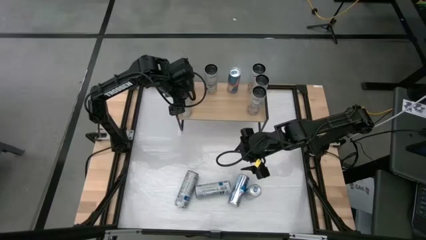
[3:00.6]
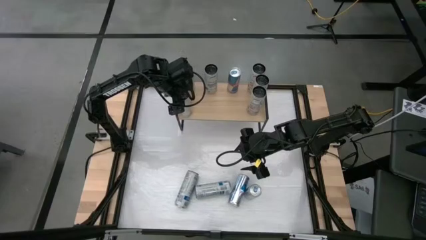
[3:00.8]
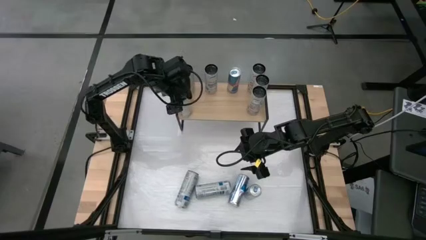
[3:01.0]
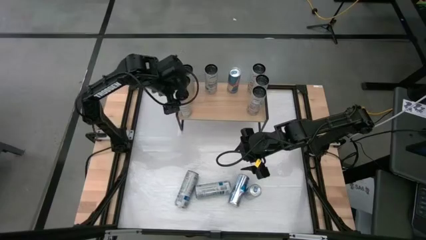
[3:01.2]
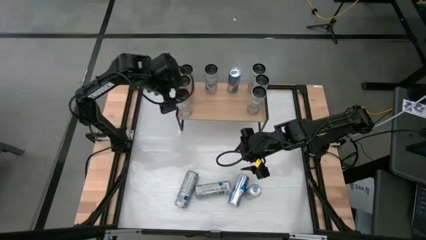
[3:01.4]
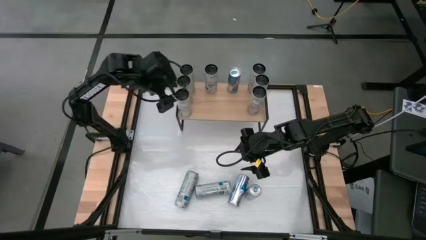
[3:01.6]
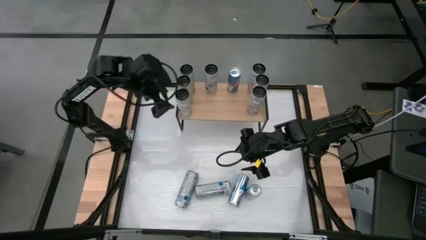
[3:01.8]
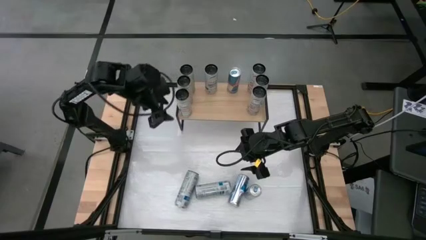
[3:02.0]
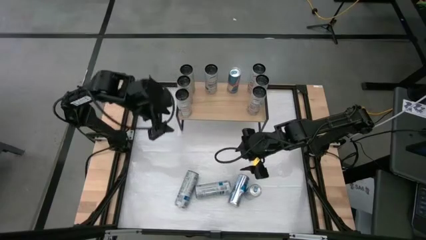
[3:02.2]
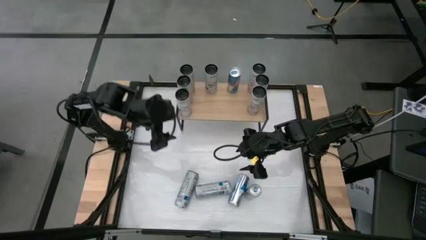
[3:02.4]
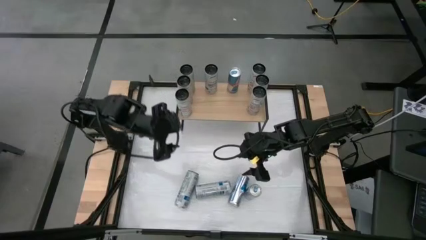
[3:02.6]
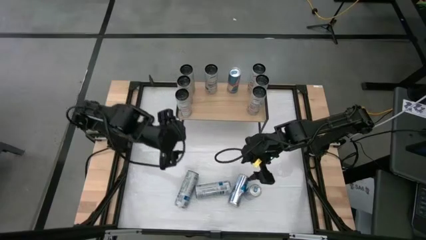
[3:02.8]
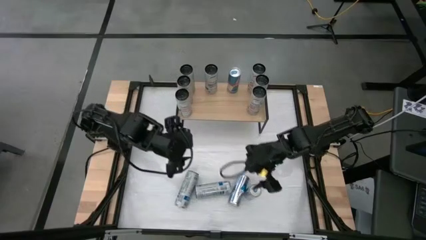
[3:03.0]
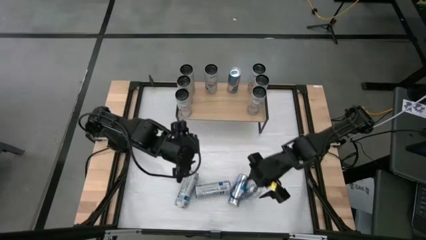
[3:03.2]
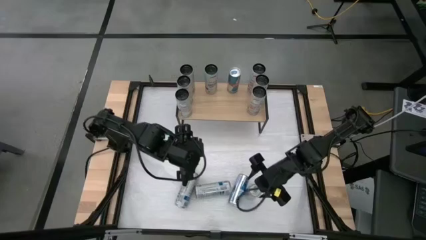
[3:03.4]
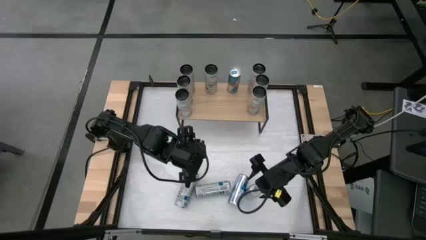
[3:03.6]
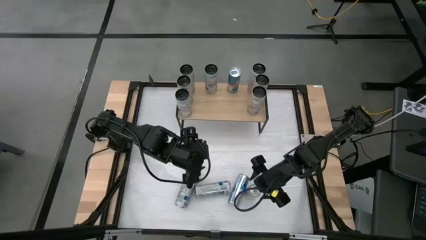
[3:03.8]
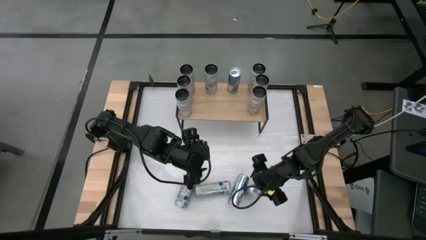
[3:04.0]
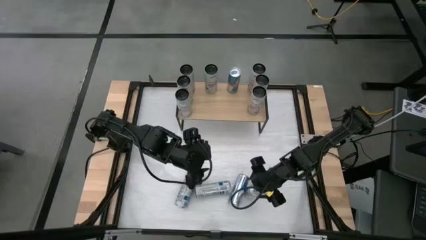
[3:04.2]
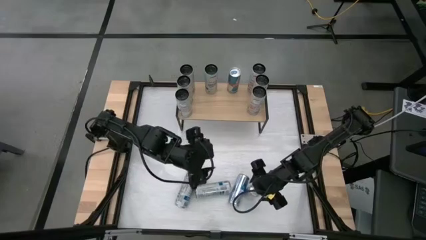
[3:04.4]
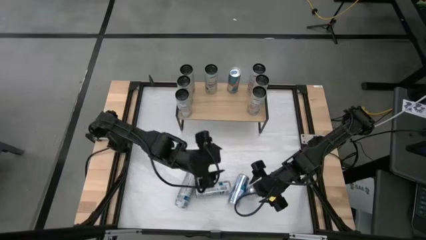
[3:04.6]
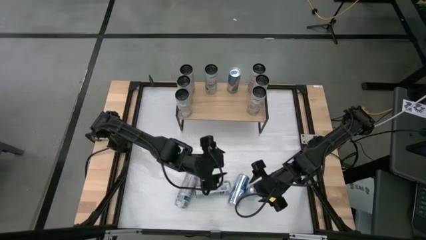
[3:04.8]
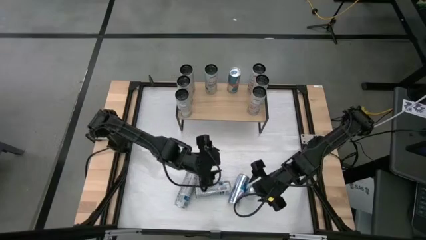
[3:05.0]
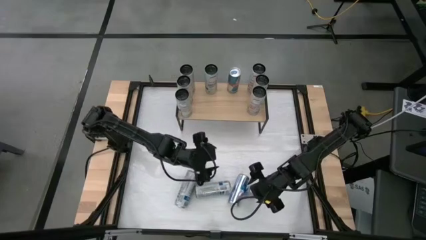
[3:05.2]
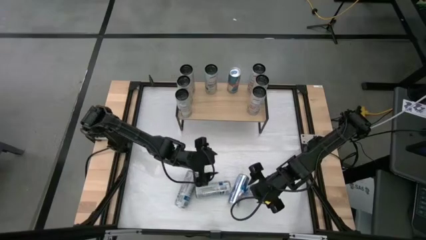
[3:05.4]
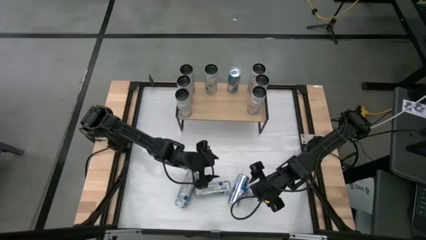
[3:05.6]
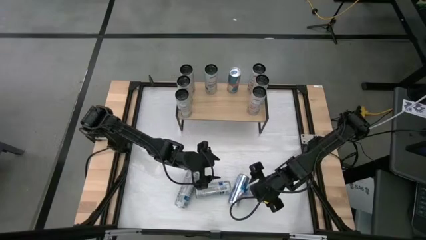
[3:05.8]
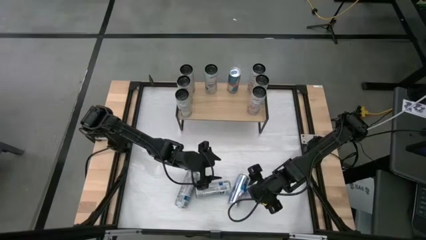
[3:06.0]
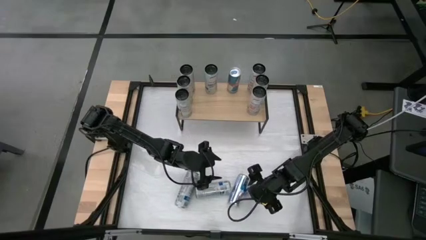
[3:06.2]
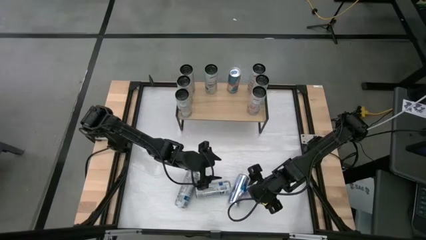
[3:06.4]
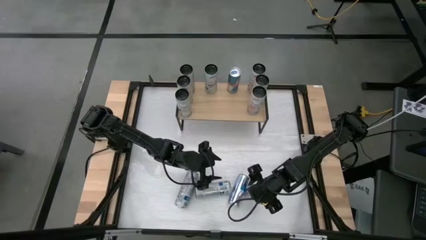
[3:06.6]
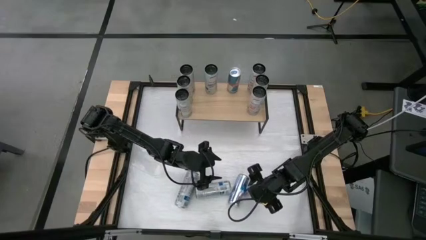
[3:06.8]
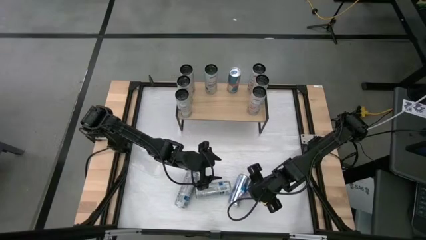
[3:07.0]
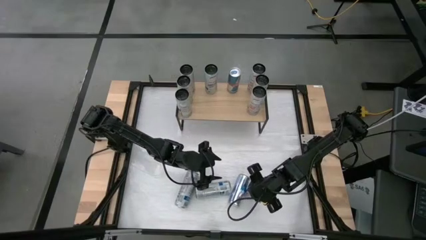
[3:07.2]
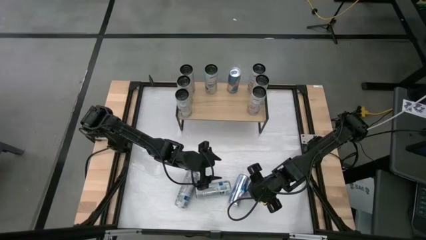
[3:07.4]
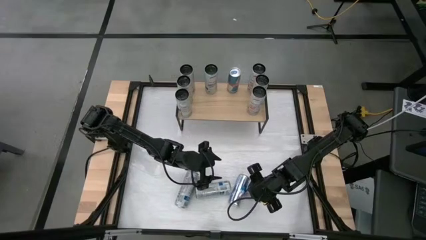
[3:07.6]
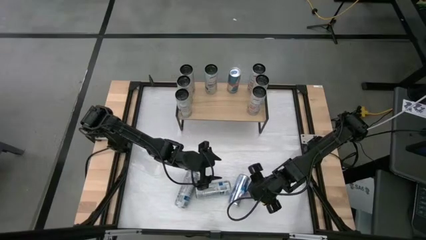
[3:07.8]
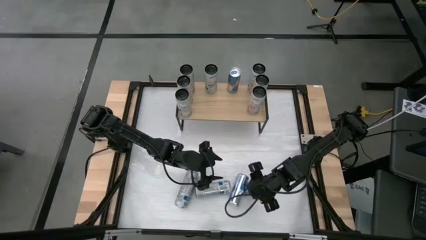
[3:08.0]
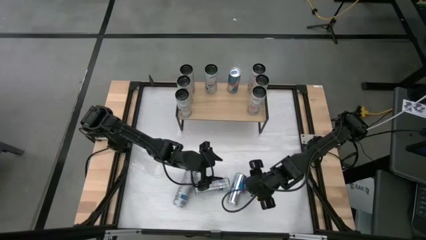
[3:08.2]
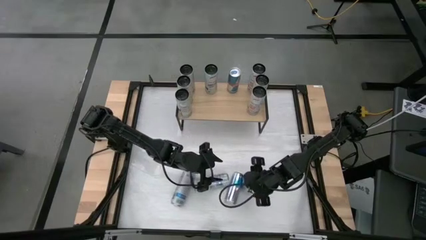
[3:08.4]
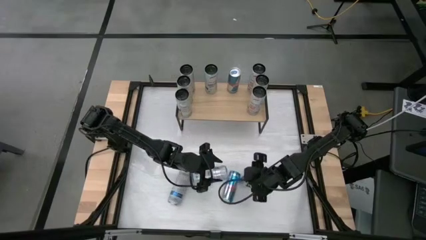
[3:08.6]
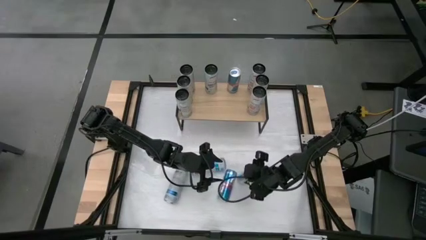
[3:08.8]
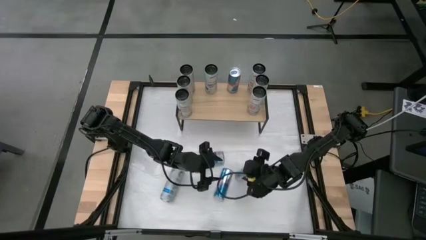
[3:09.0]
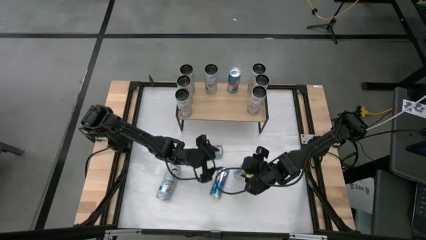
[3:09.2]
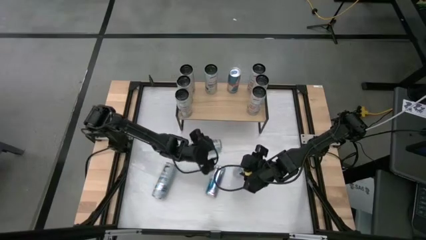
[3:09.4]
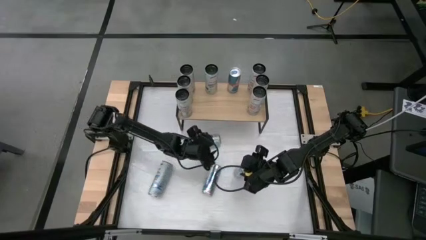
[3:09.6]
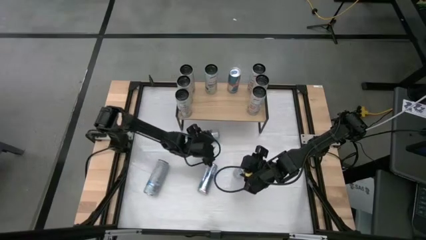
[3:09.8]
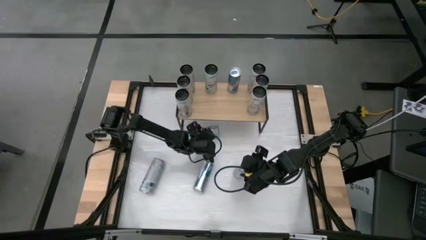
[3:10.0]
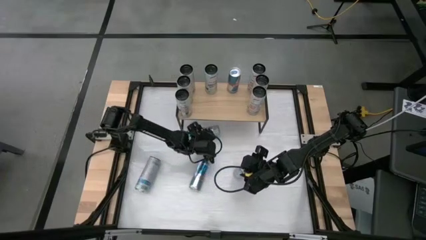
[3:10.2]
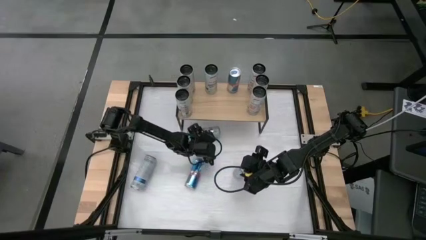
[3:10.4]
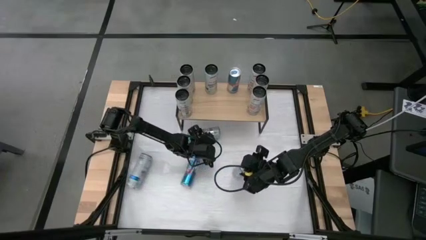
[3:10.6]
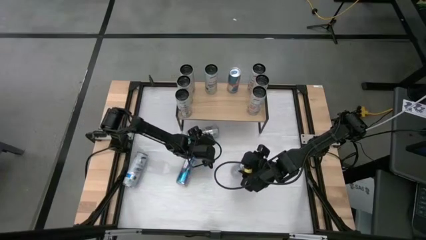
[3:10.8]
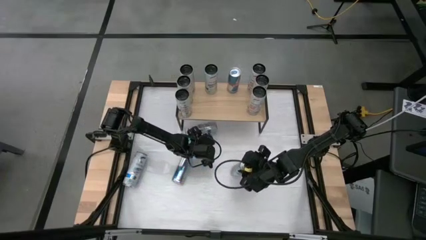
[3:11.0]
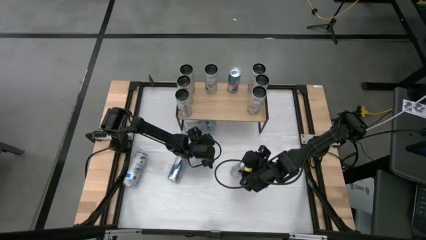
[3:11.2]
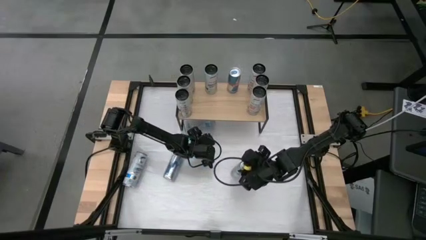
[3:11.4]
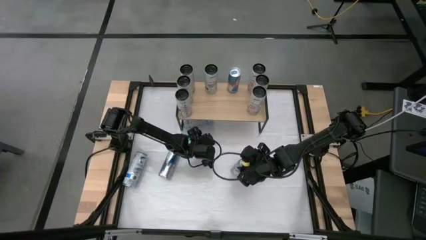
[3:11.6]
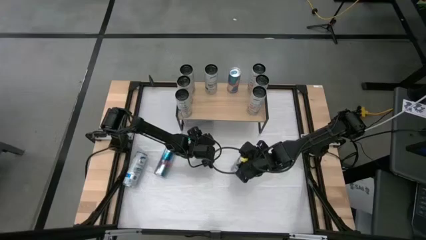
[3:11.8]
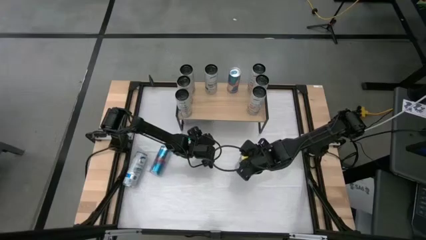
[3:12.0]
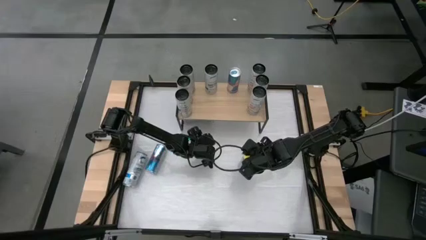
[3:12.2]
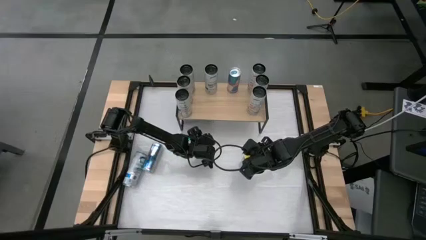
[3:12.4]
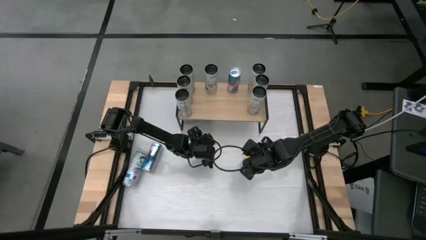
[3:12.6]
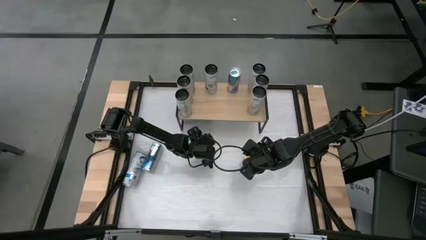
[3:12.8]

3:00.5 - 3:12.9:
Task: Sort soda cans
Put the right blue soda can on the shelf and align with other blue soda cans

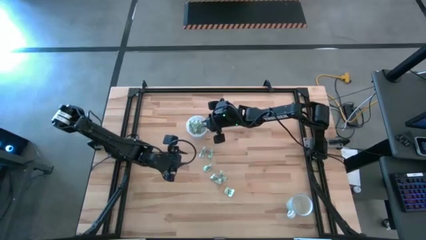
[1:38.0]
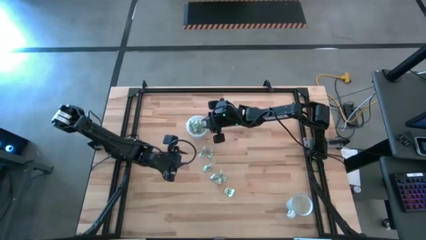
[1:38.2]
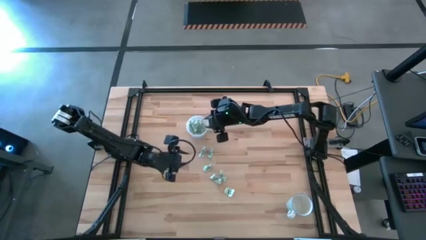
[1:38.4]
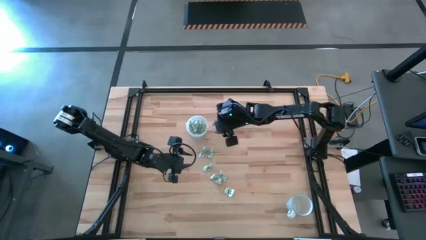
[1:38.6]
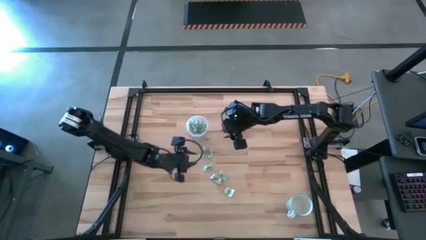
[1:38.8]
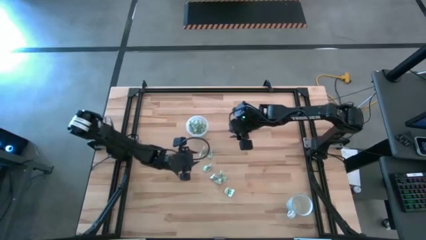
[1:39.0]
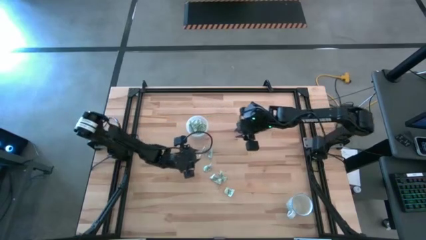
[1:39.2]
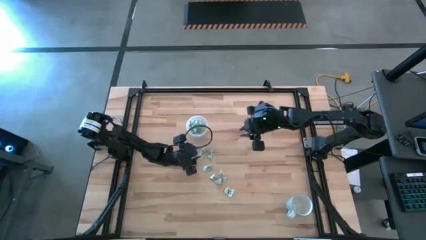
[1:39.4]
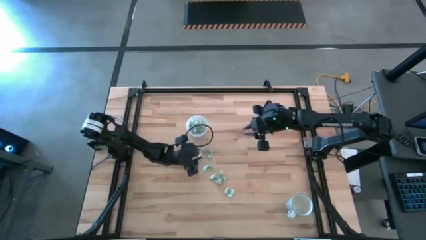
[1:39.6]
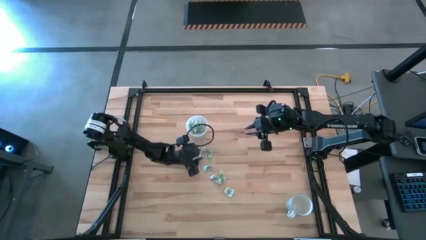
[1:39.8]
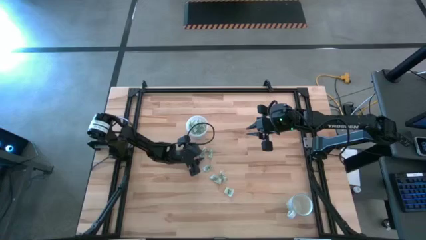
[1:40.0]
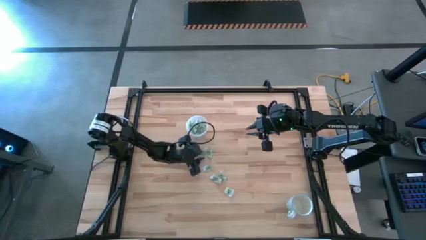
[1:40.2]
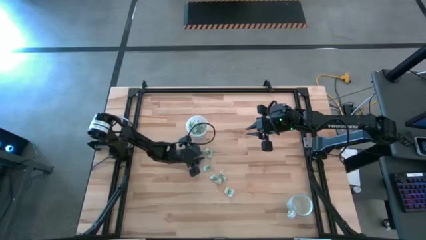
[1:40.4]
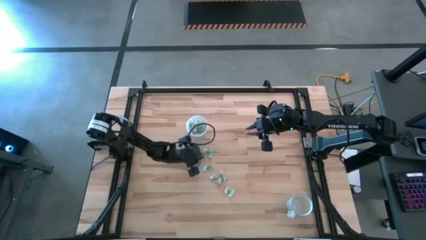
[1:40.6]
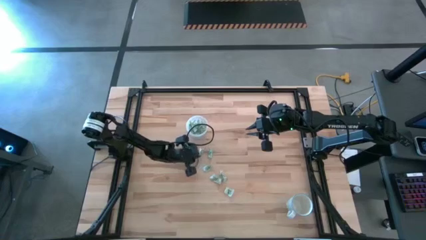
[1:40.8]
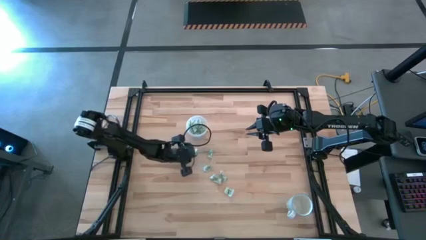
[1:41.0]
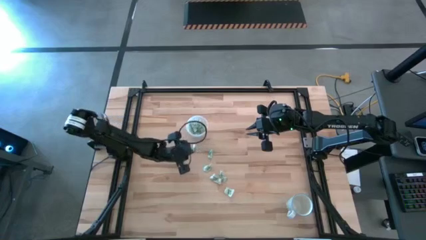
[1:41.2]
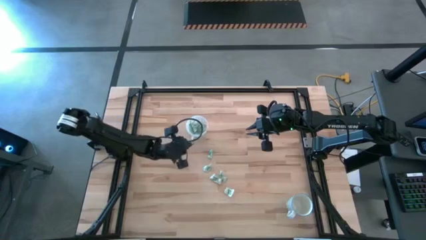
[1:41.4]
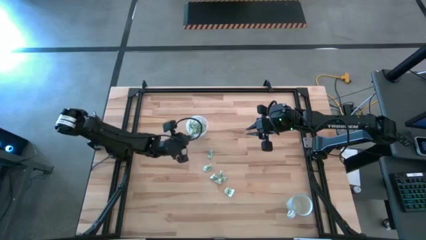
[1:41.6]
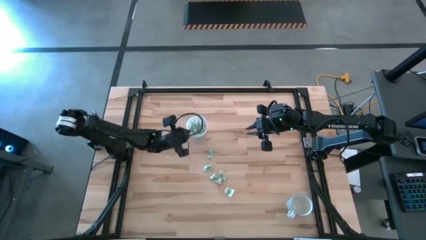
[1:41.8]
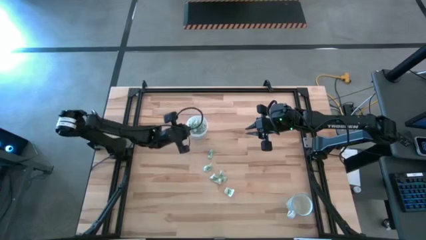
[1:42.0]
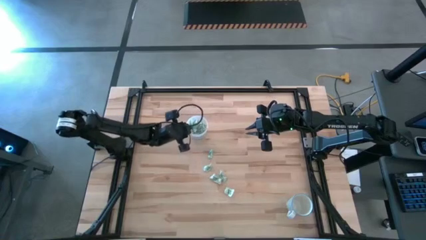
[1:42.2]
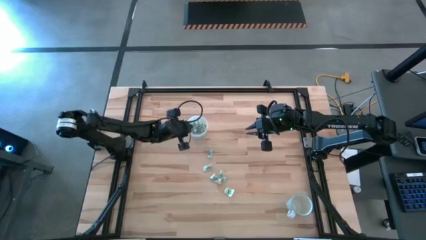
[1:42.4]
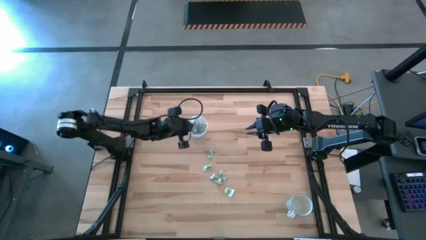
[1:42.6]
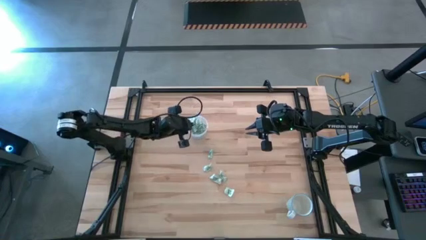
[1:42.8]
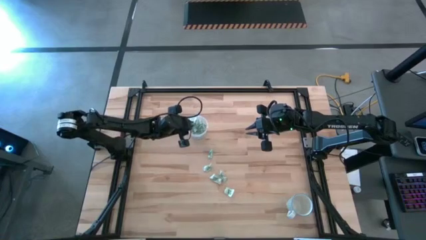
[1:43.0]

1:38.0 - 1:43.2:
Task: Pick and place Stevia / Truvia into bins
Put the stevia packet into the transparent container
